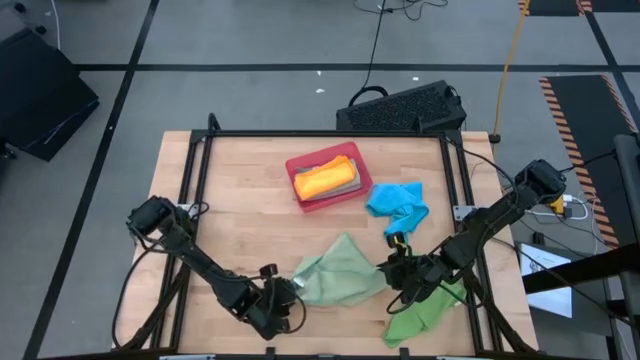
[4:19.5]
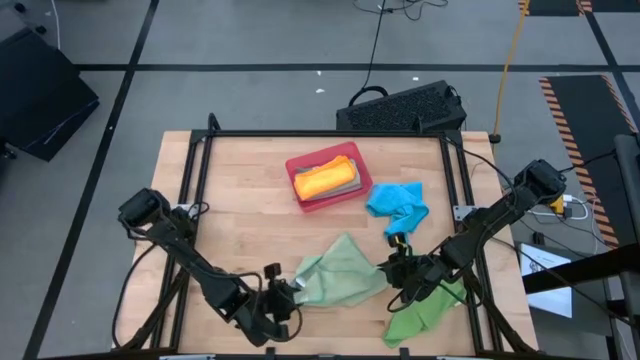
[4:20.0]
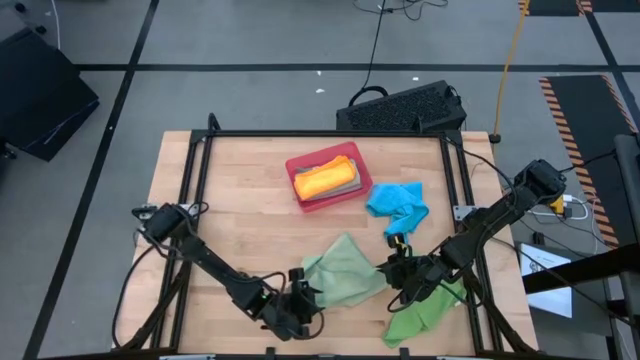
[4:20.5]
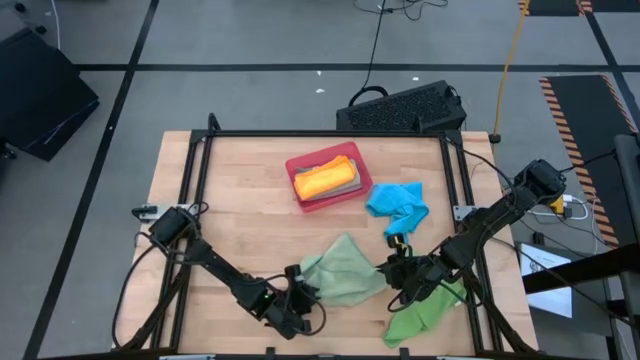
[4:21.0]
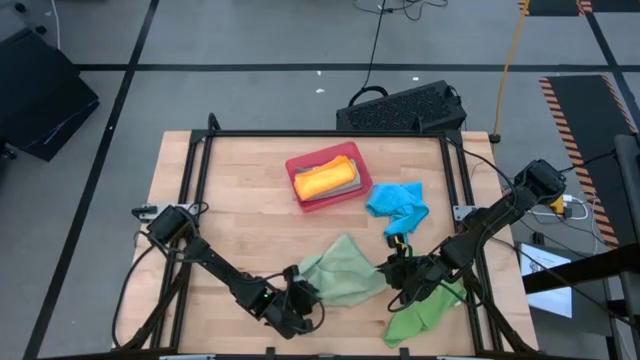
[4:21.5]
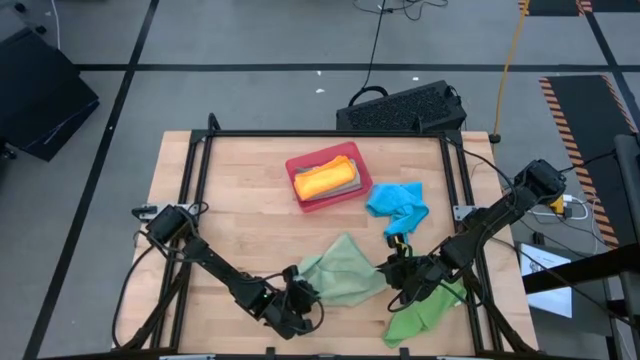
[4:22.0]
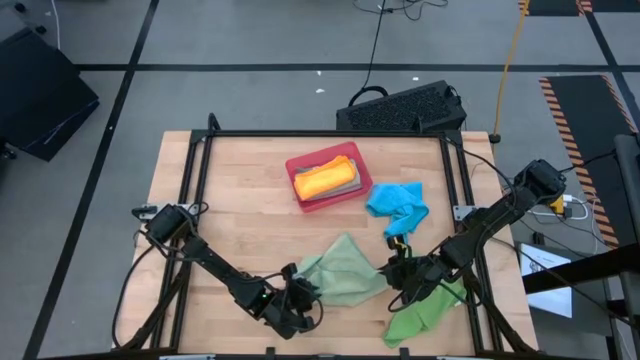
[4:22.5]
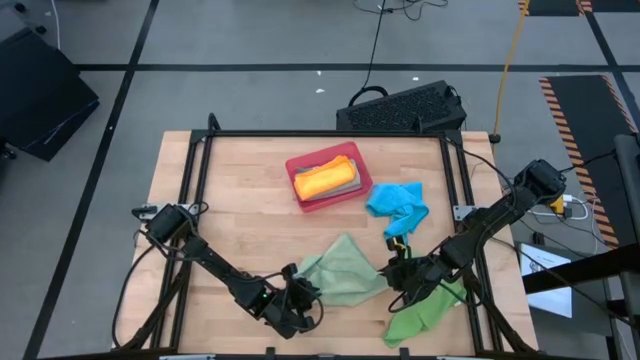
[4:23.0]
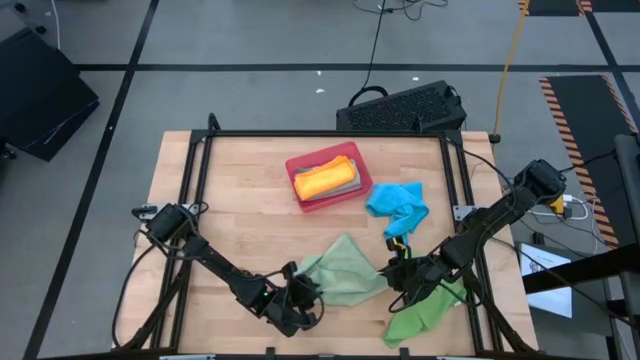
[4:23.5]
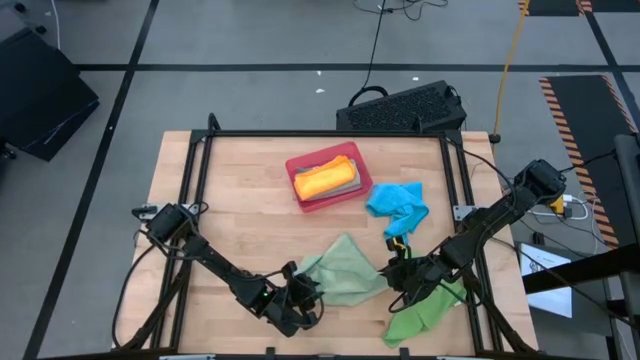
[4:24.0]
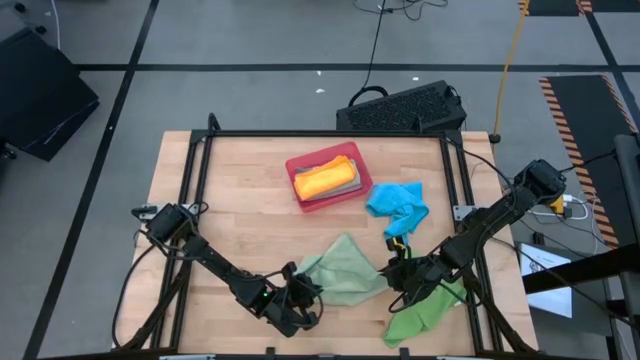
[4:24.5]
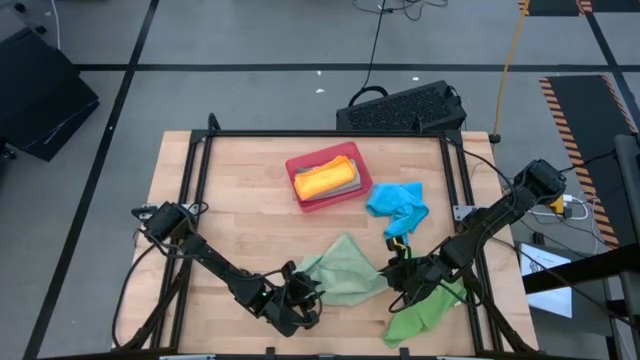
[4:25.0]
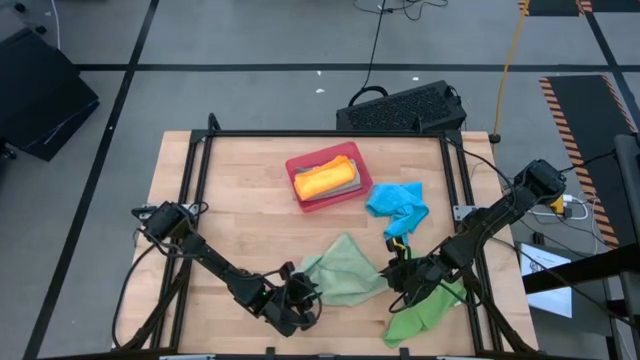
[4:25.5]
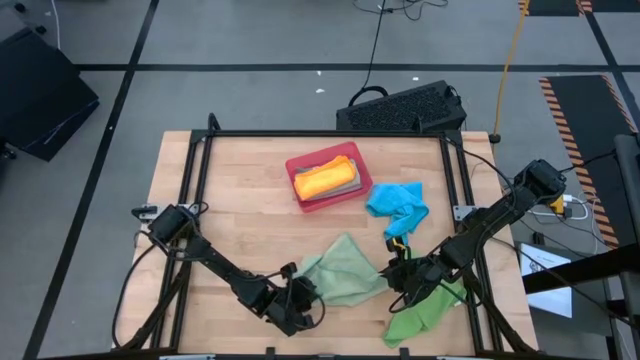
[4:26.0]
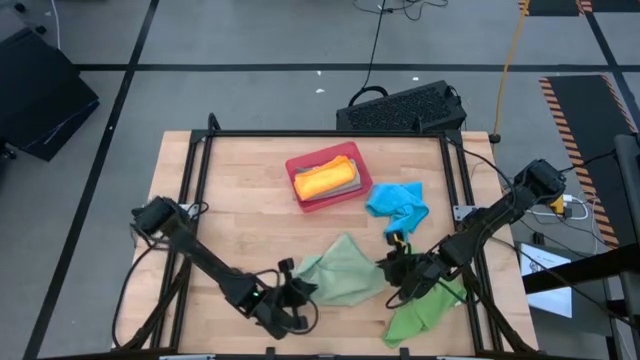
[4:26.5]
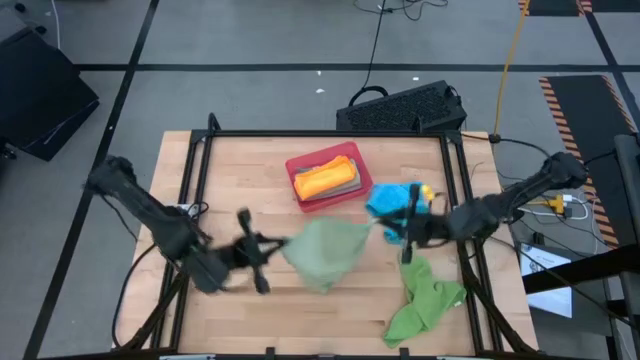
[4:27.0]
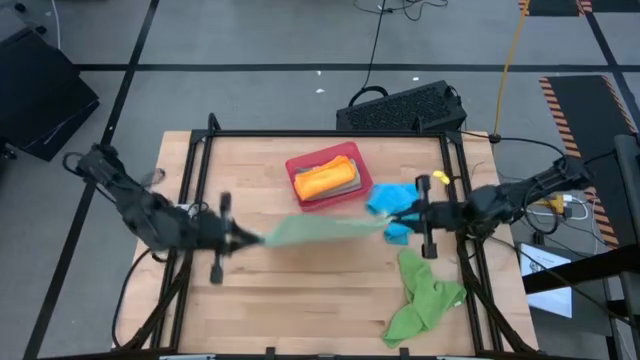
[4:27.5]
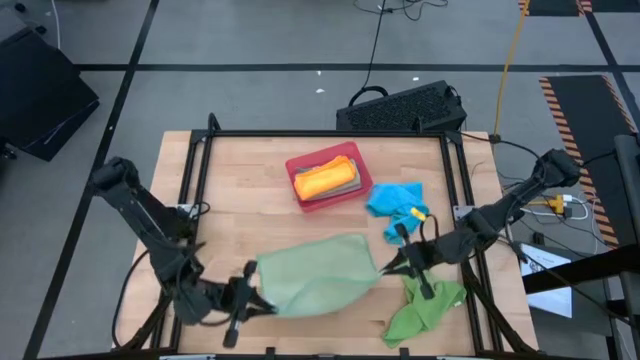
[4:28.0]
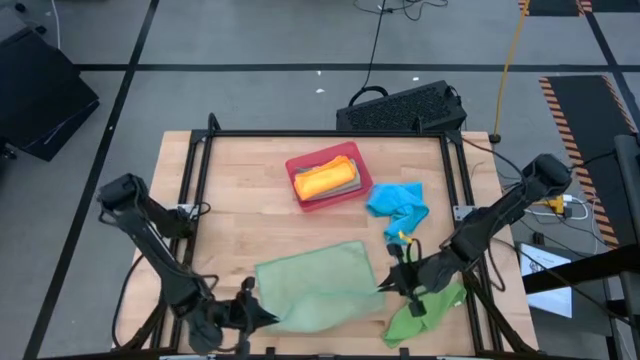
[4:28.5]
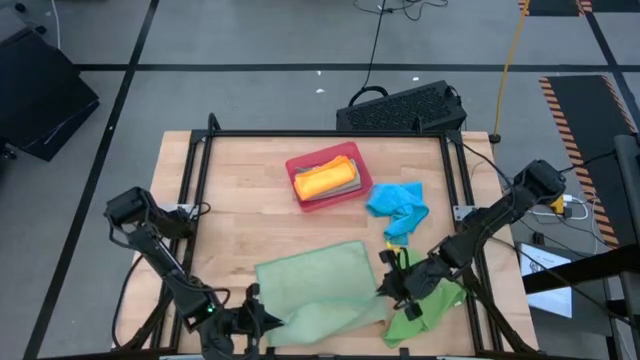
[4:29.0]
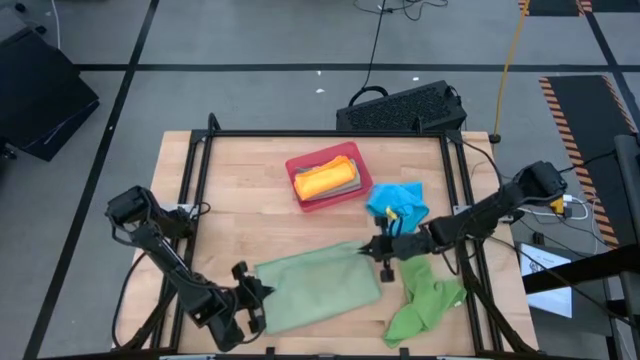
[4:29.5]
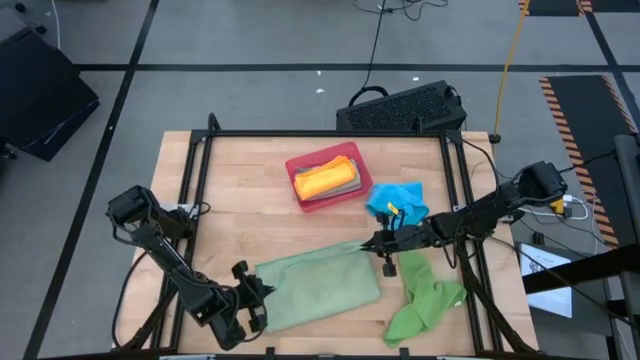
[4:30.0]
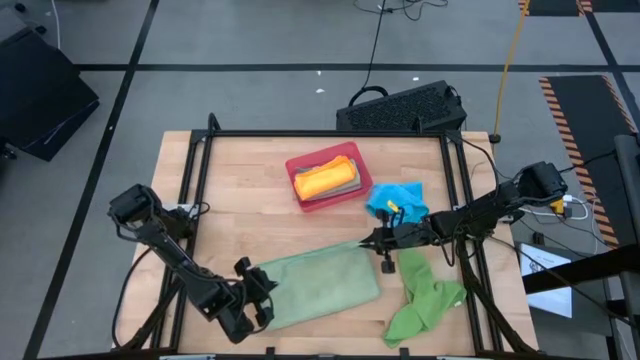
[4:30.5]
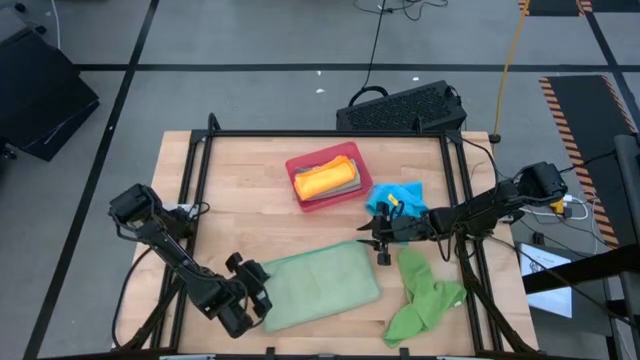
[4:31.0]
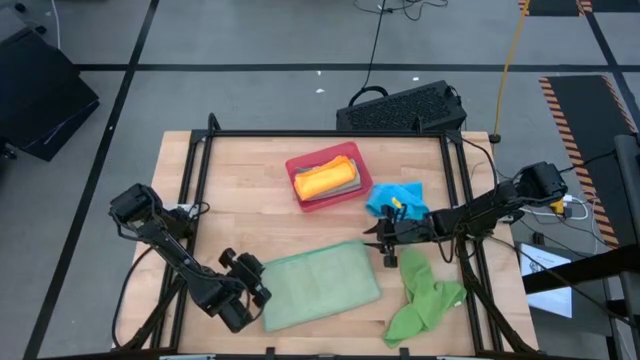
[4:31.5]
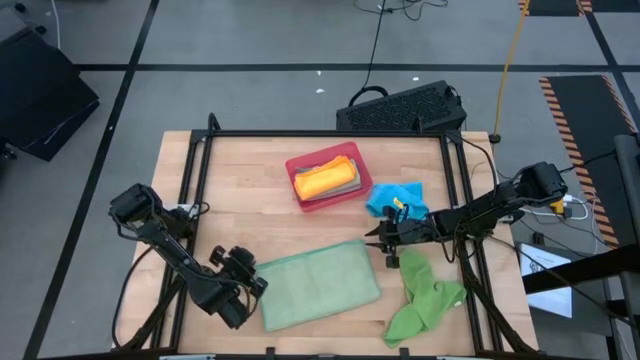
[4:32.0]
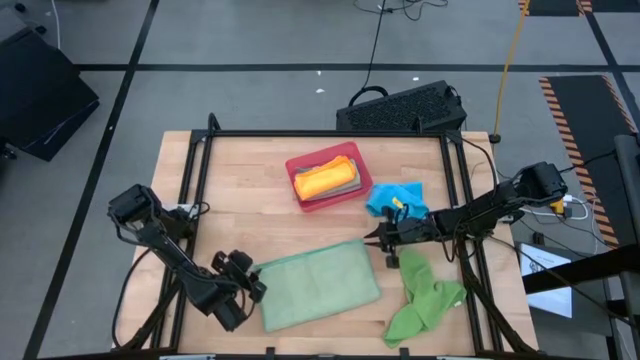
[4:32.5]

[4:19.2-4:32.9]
Task: Fold microfiber towels
Fold the light green microfiber cloth

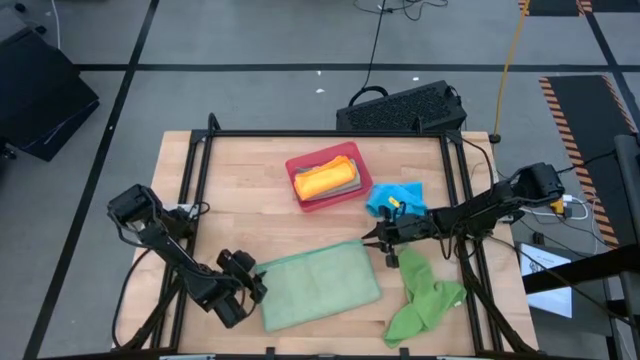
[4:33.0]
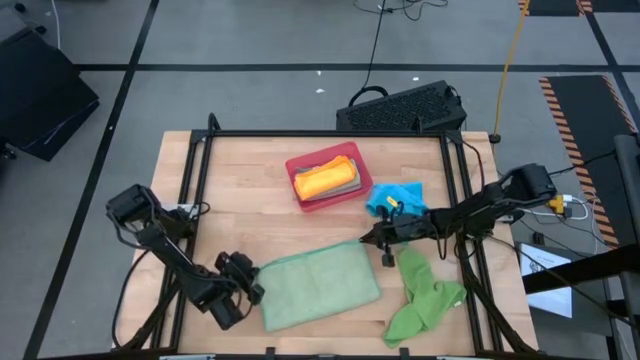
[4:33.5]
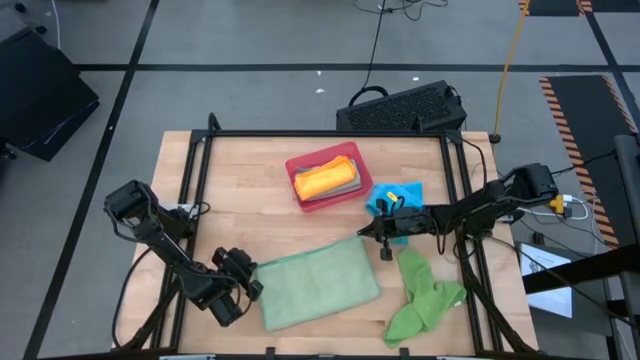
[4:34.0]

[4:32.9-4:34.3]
Fold the light green microfiber cloth
